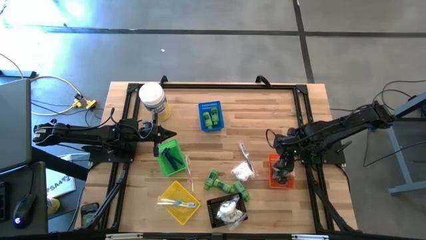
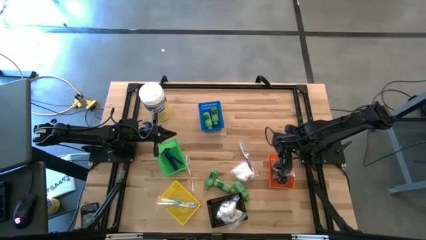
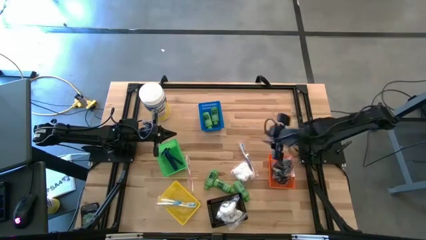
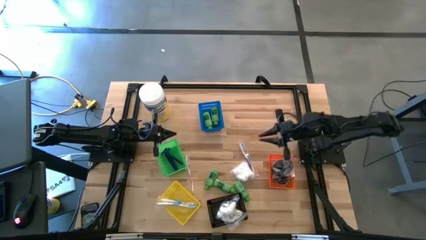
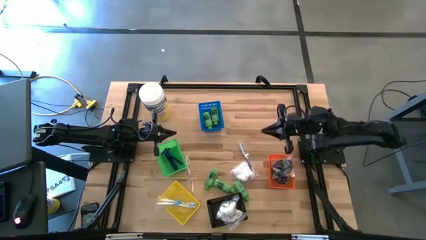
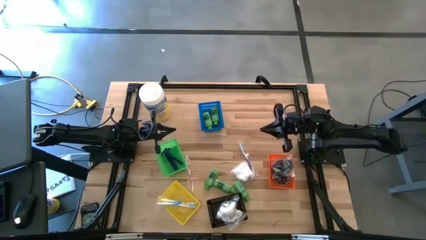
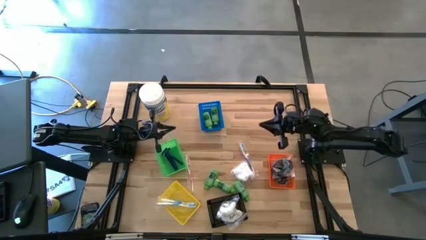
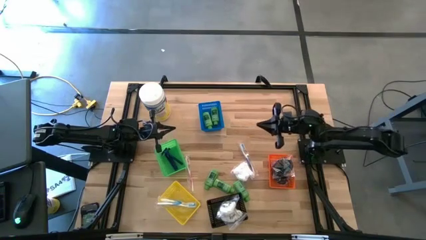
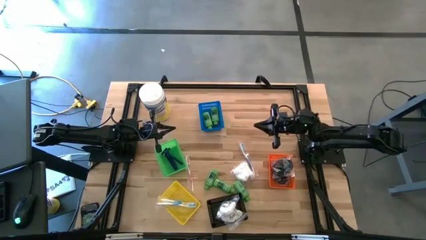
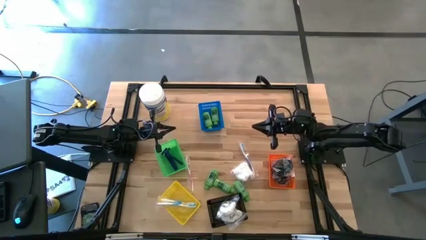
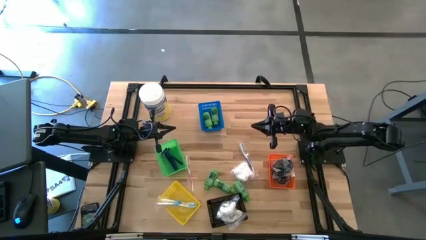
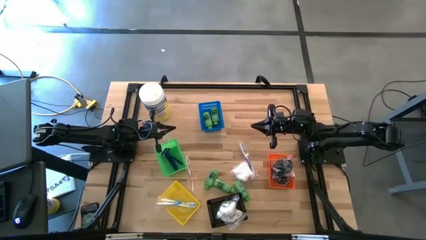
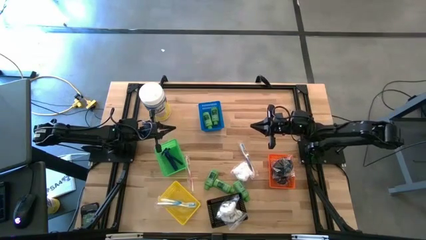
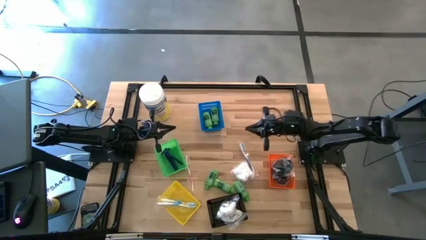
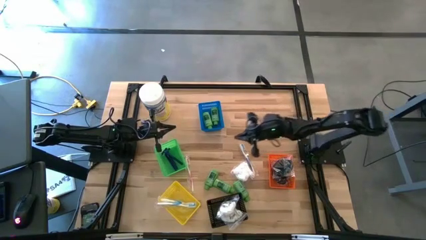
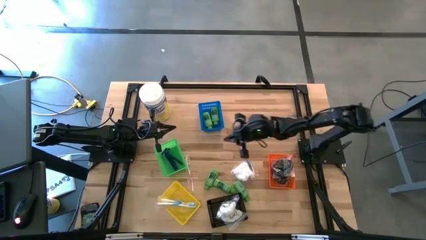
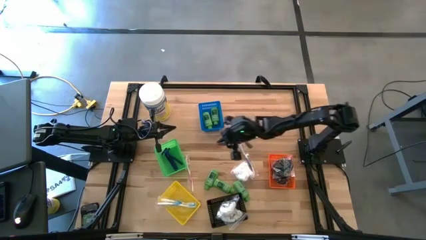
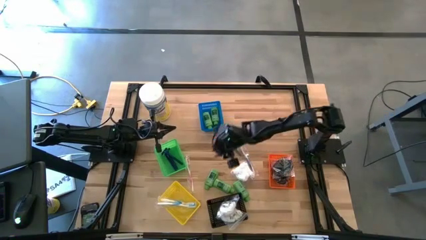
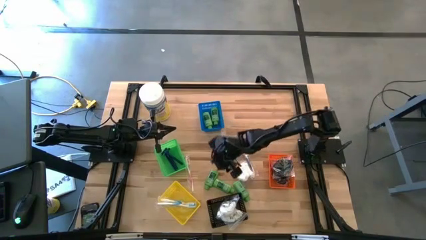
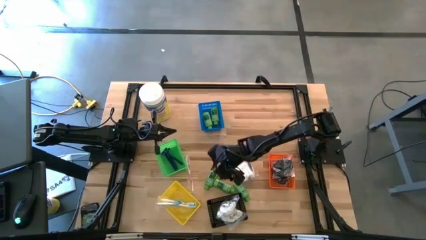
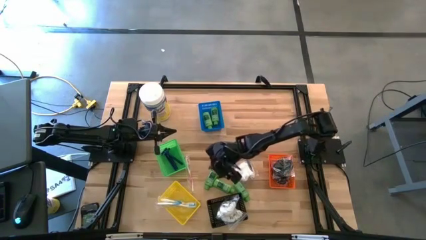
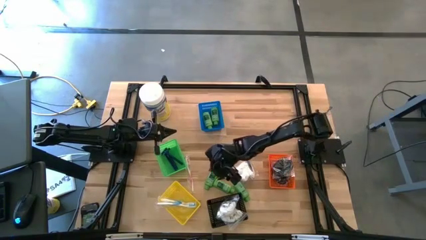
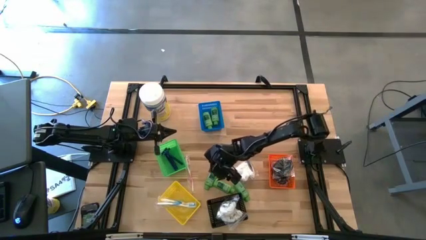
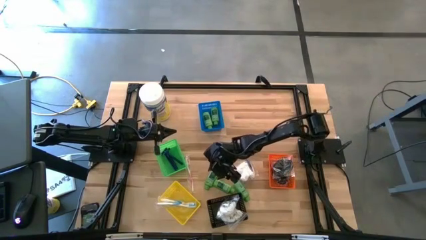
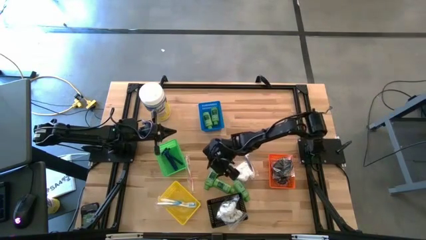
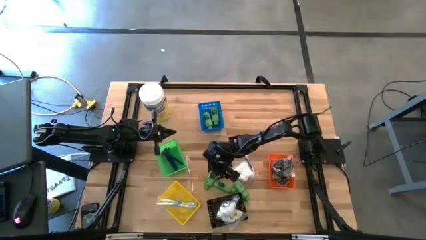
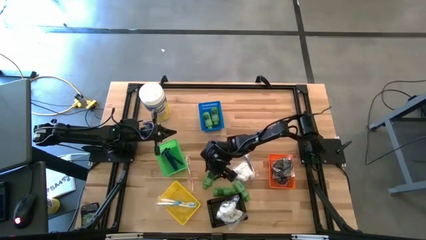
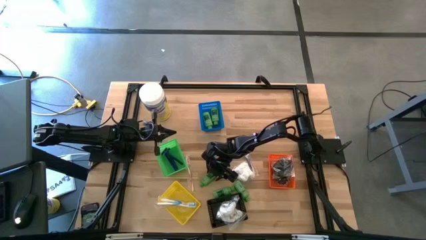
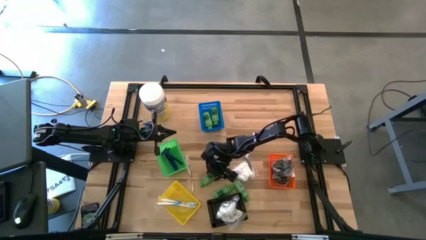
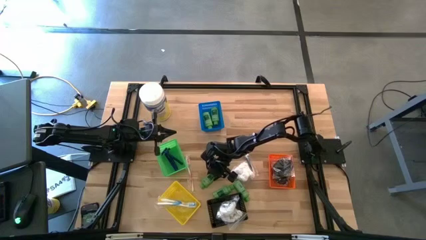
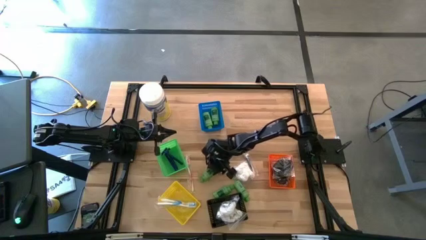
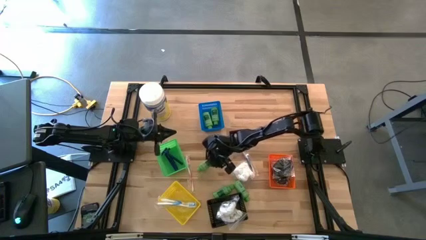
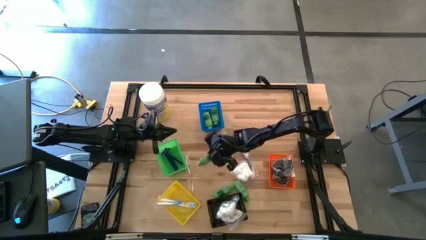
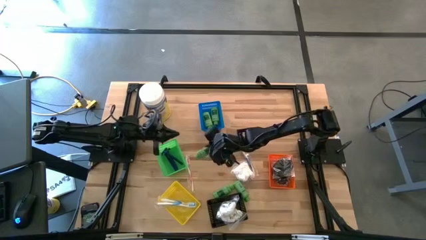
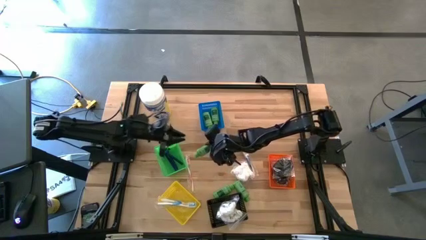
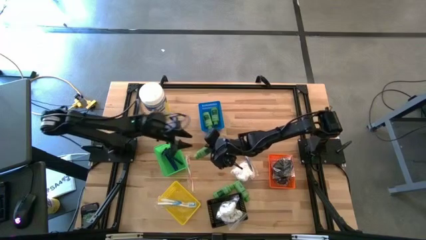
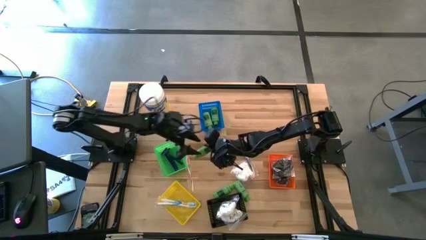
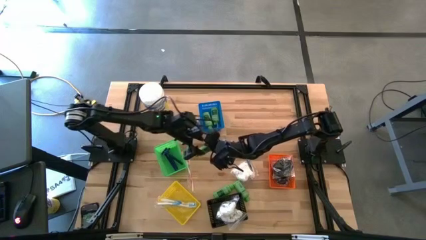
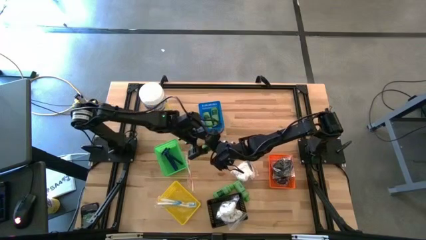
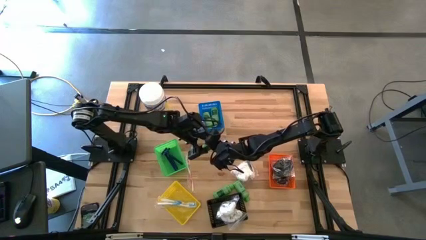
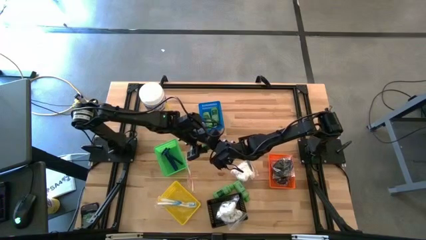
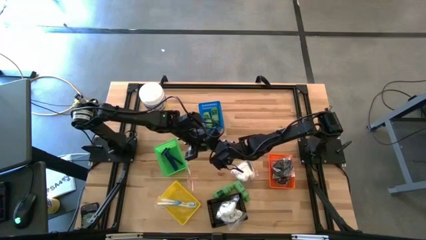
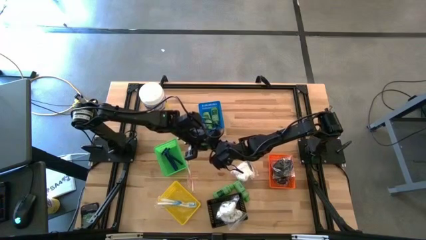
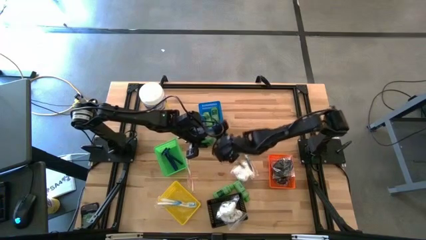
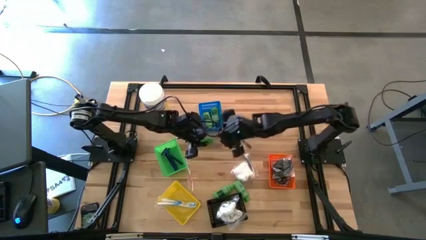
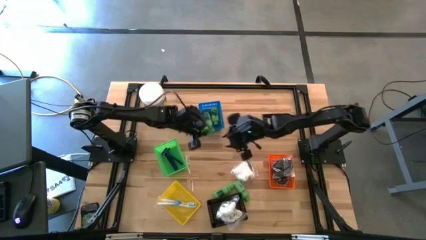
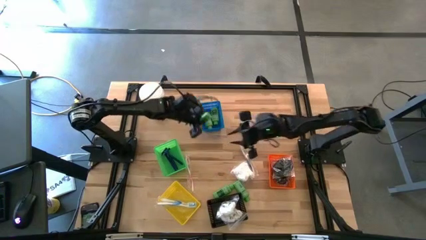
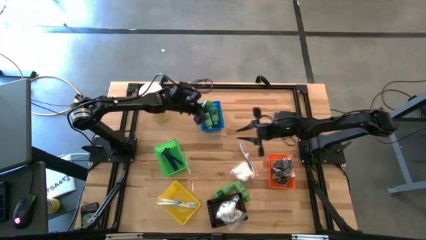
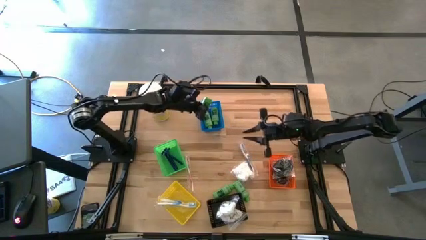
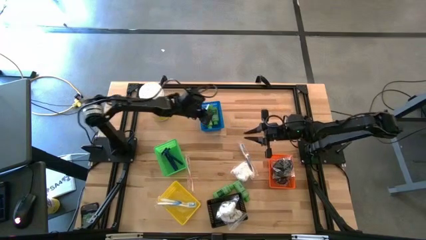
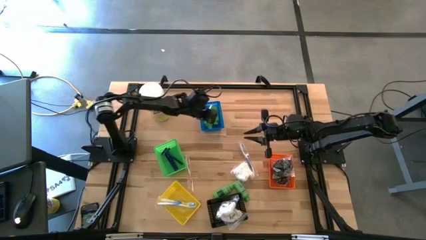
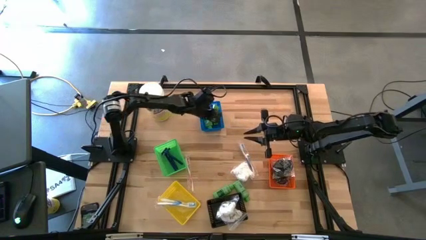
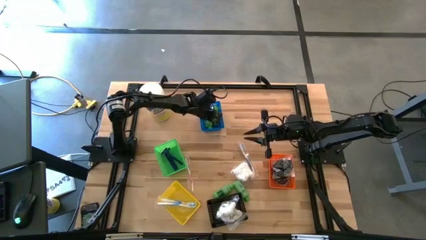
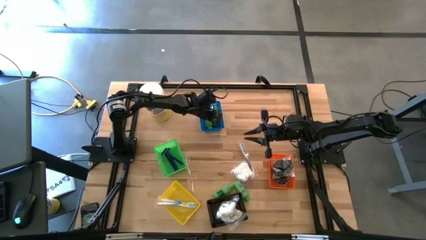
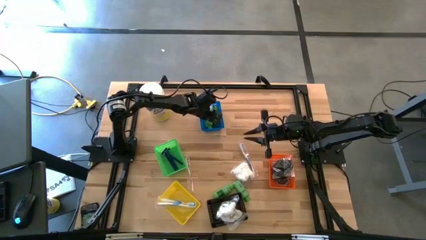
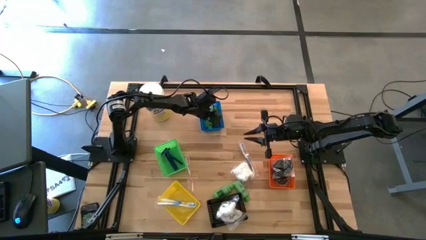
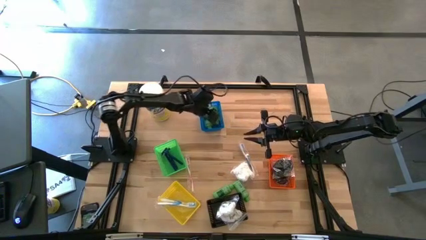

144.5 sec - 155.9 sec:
Task: Pick & Place Travel size toiletries
Put the shampoo bottle into the blue bin

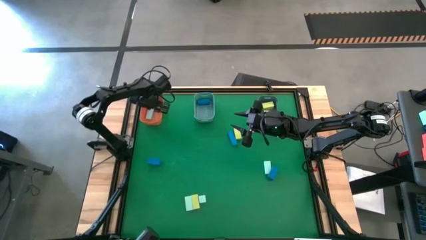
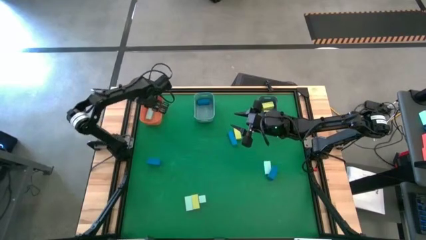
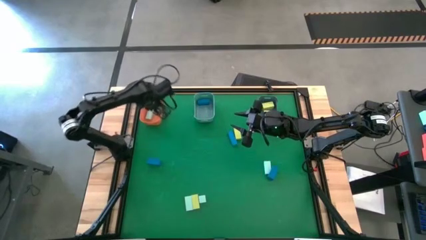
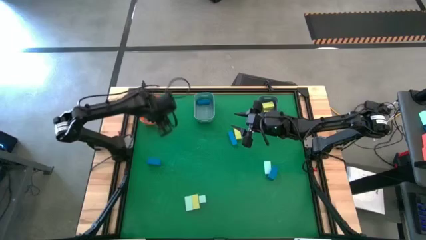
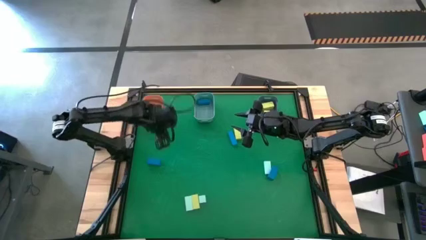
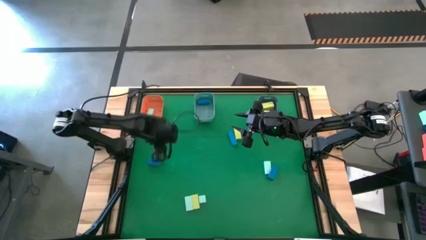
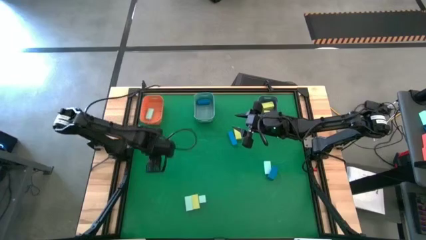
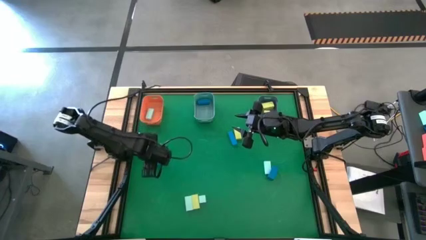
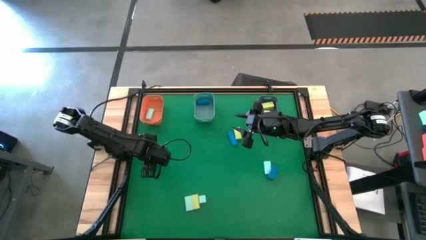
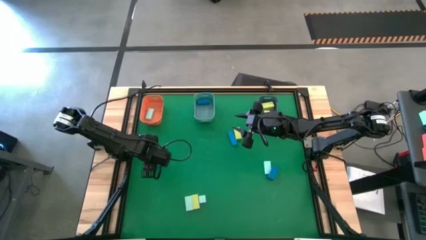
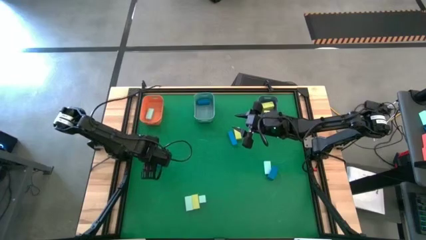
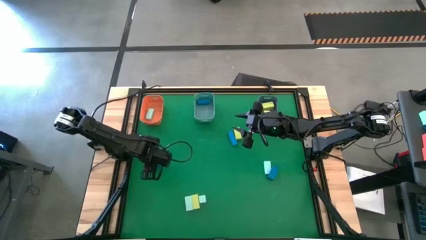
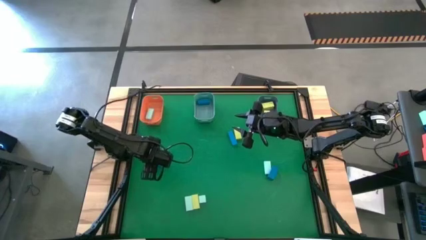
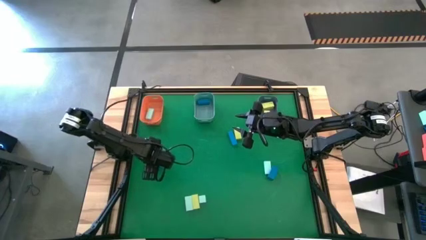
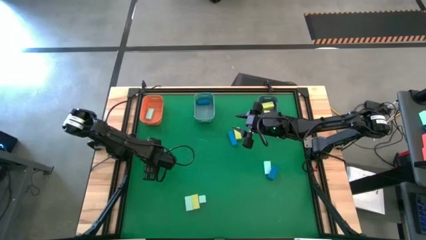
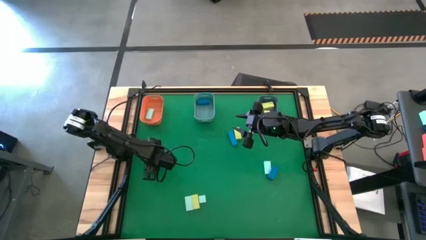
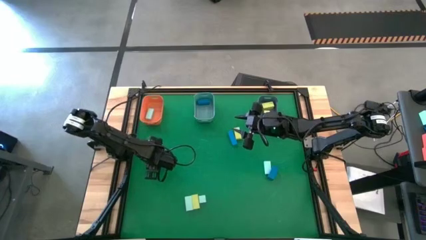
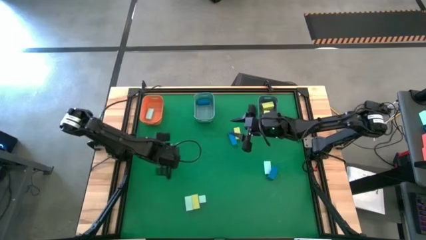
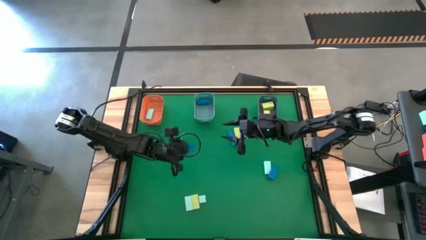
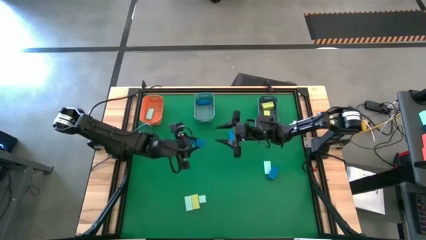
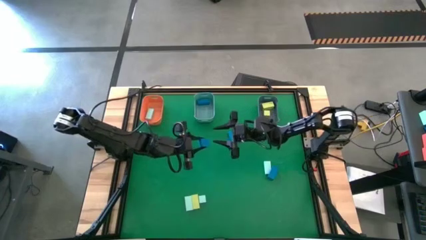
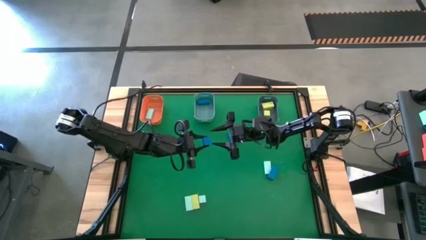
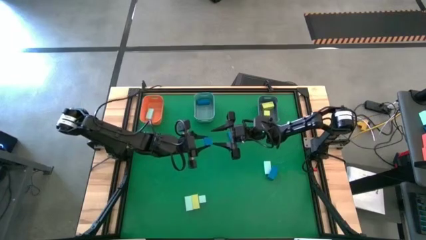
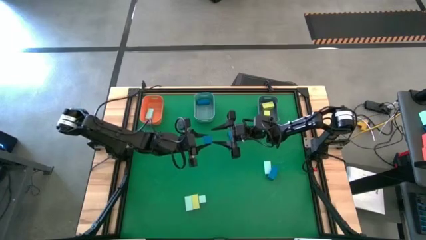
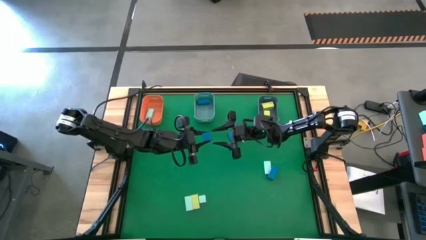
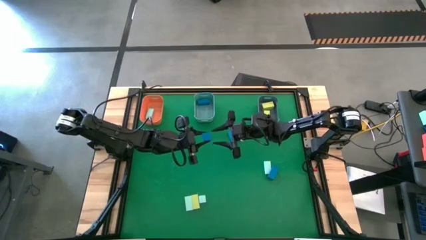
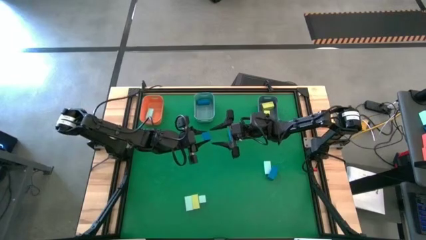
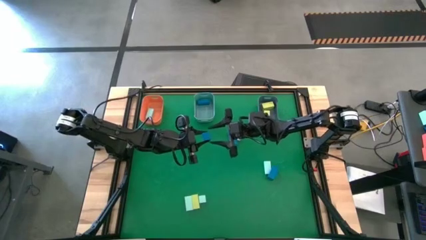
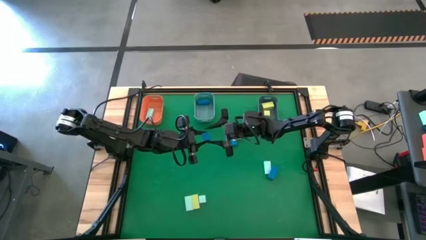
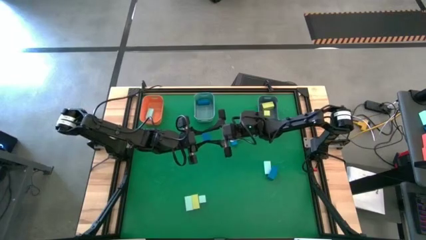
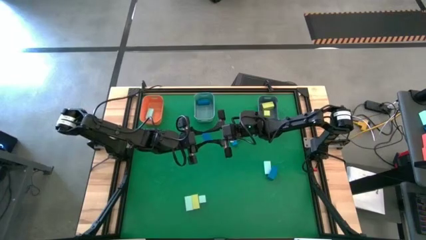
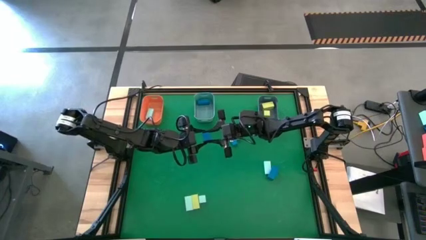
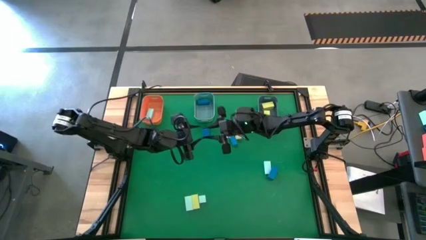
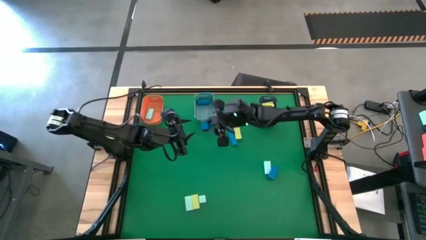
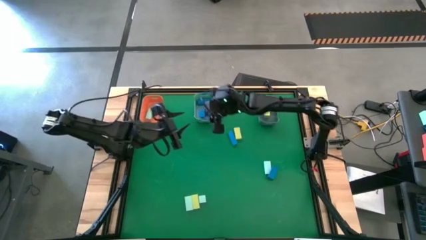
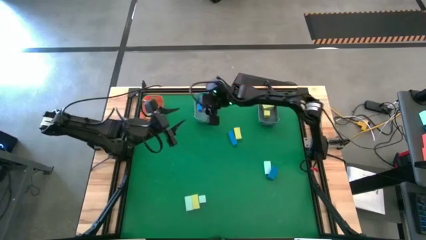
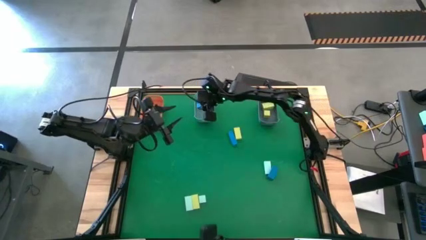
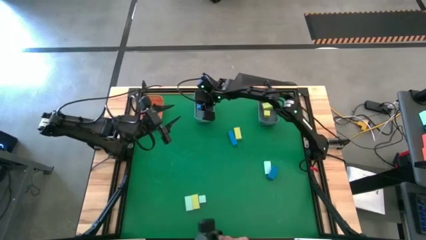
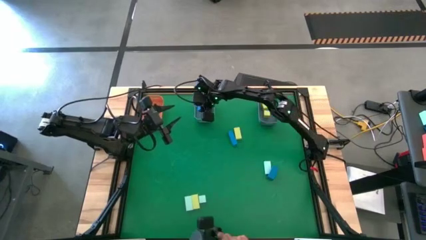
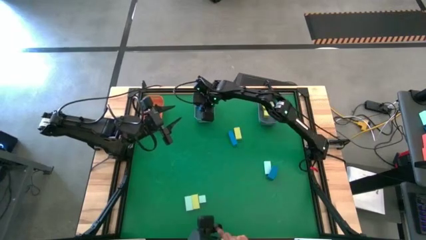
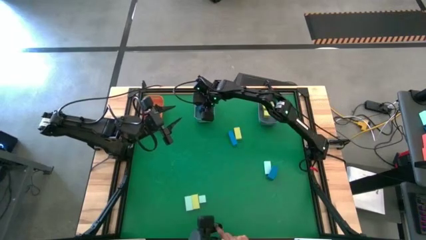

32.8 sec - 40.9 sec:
Task: Sort & place blocks by color
Put the blue block into the blue bin
